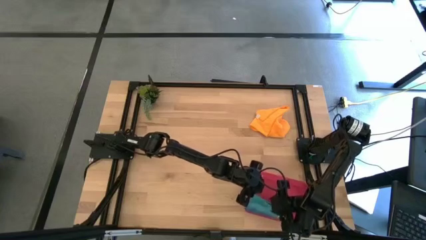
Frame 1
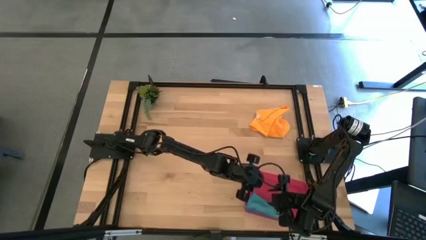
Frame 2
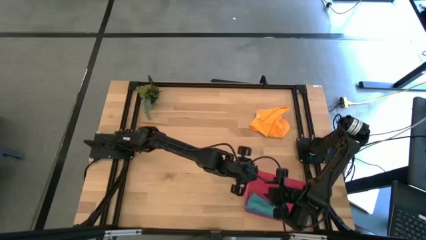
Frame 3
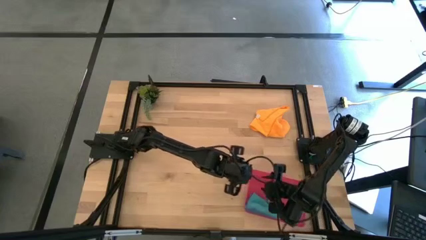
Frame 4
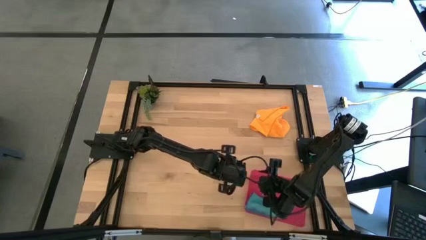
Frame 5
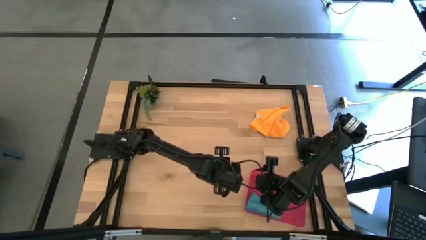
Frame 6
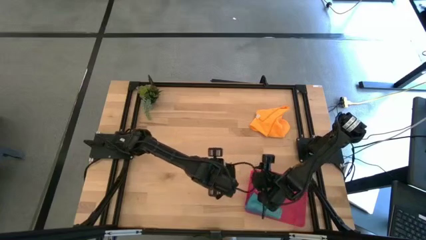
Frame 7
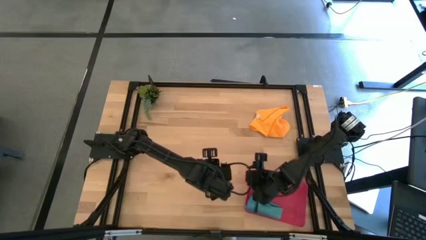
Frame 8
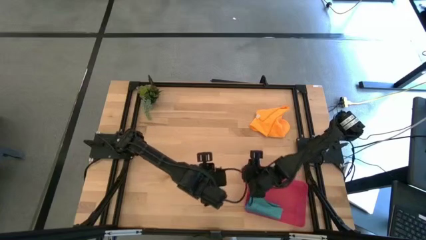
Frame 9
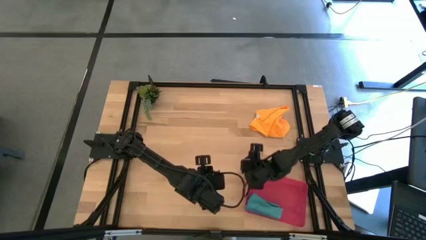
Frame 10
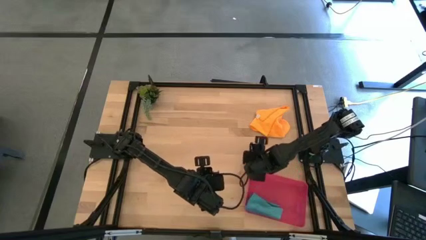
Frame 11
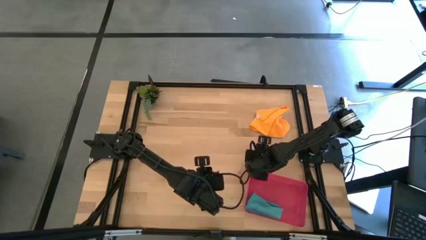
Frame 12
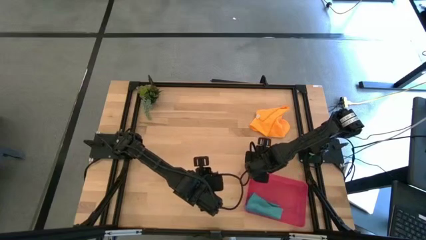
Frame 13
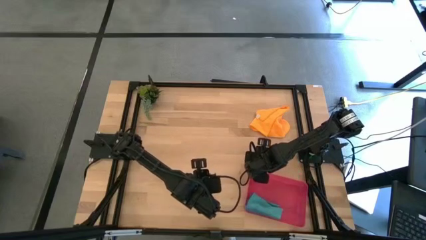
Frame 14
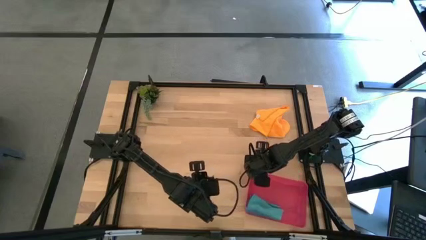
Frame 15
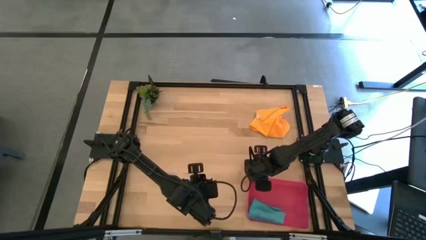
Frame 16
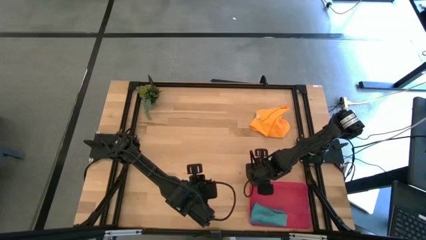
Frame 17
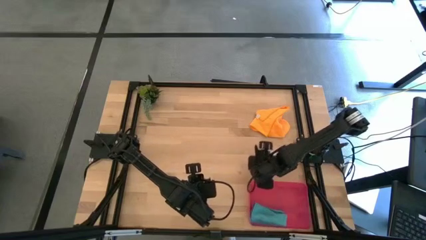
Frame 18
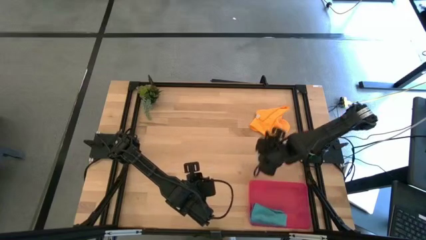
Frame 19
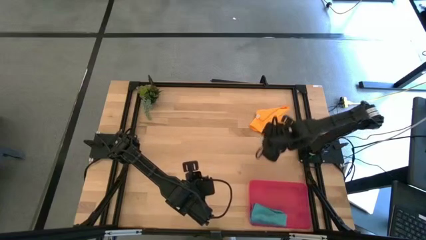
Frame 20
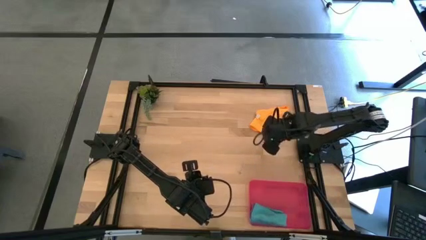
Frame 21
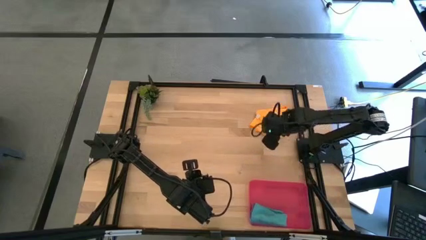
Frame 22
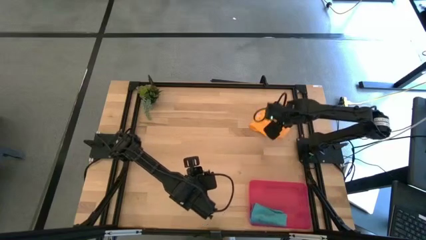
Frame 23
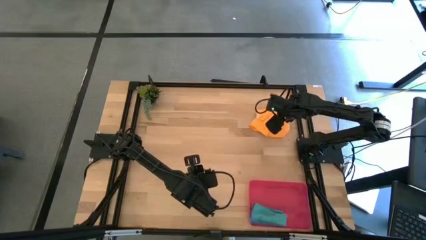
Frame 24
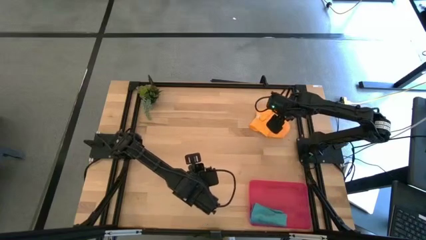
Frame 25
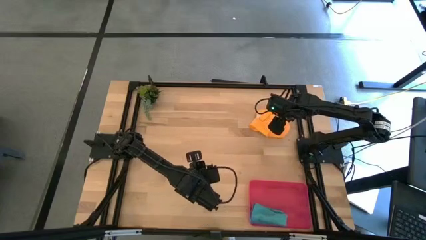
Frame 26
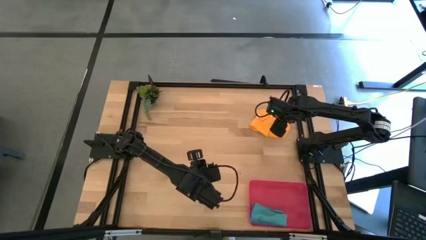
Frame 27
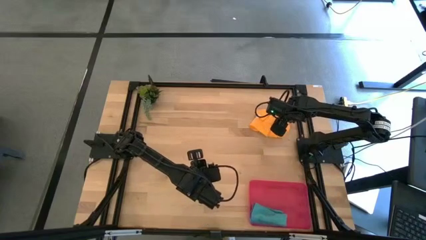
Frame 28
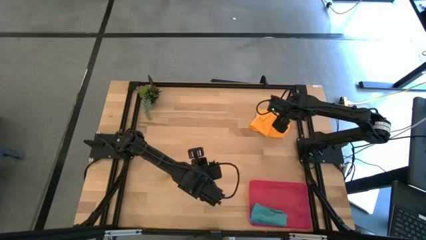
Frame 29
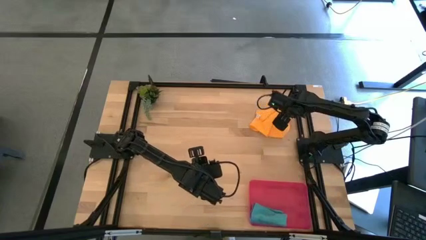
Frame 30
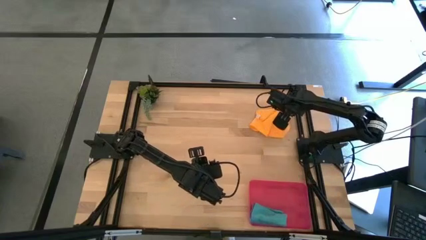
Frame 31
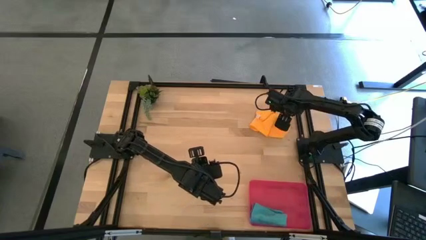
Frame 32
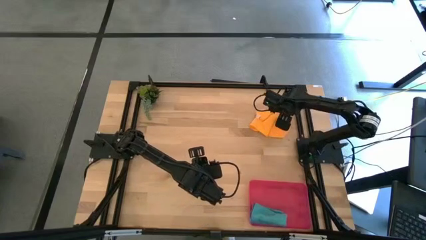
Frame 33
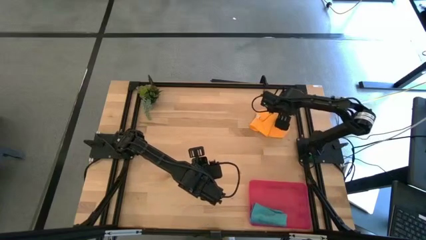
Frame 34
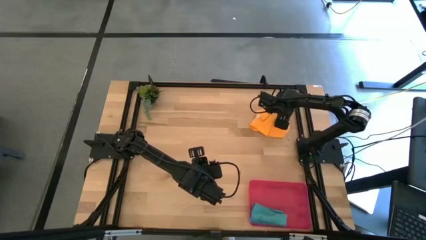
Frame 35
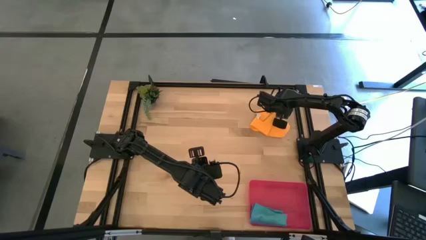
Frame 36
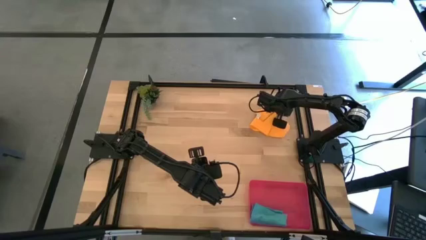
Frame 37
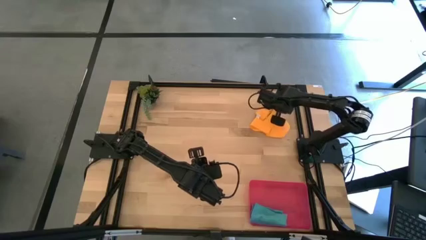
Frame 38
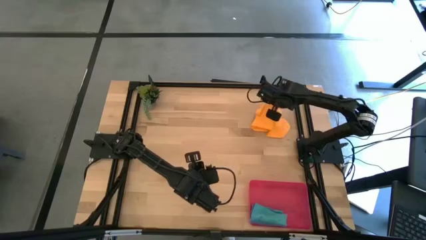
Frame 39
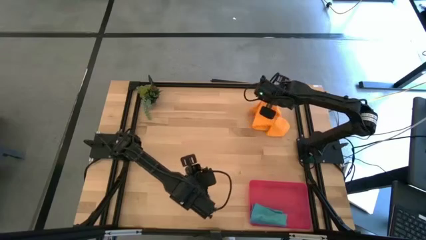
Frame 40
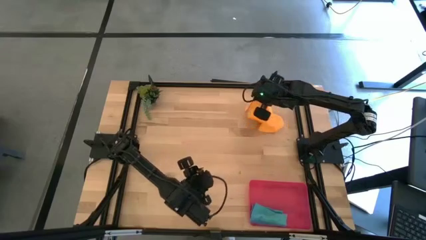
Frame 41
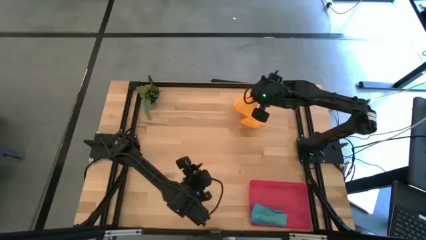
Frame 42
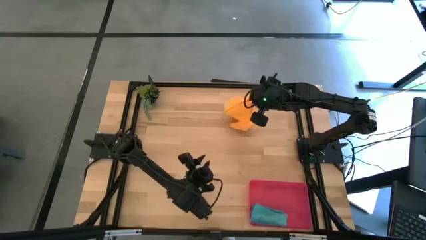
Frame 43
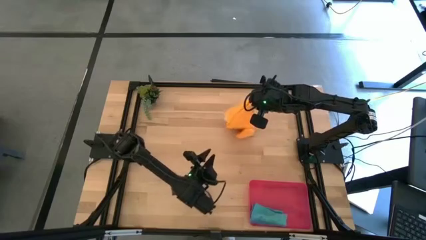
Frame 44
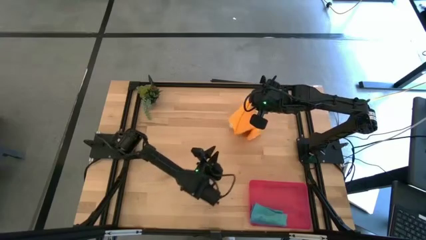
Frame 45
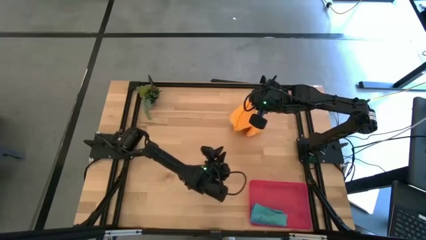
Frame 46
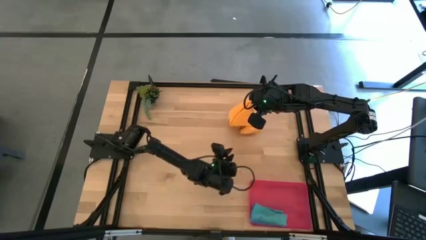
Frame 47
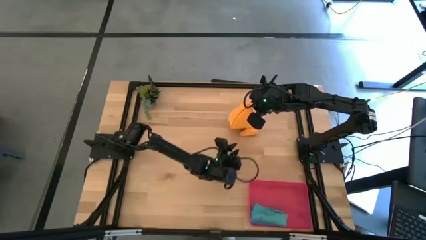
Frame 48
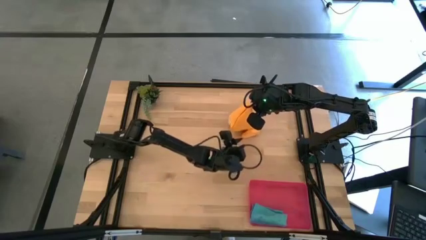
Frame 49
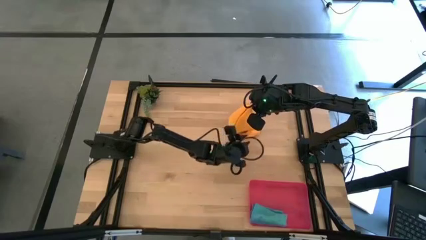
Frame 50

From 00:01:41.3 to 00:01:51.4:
Task: Roll microfiber towels into tight, uniform cylinder then place into a basket
Fold the orange microfiber cloth

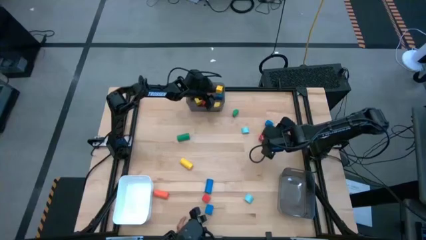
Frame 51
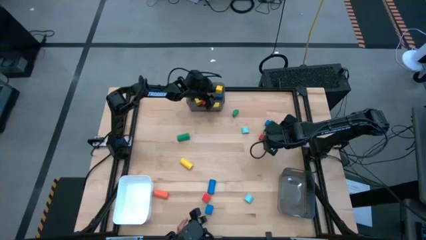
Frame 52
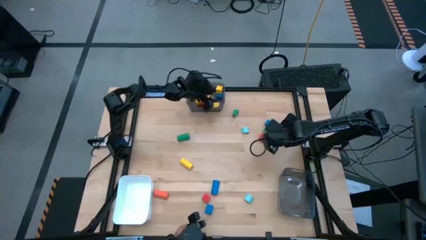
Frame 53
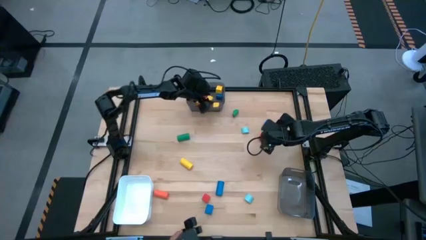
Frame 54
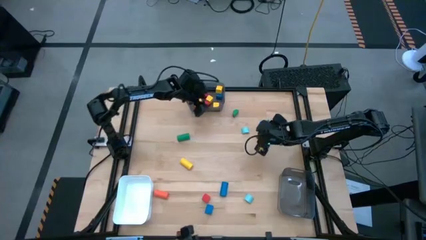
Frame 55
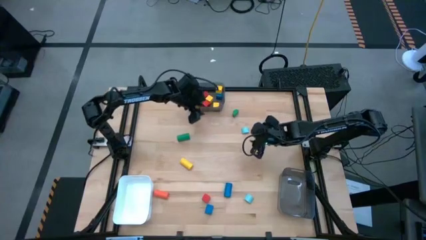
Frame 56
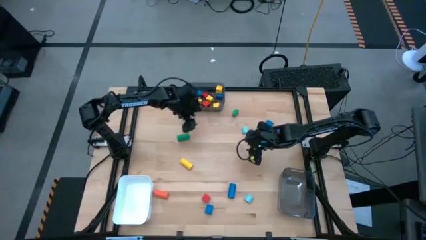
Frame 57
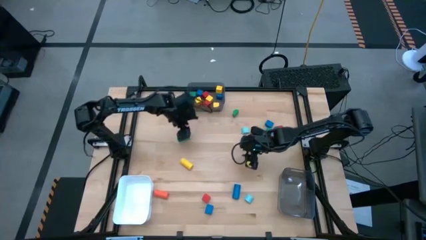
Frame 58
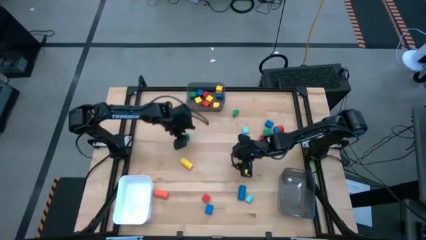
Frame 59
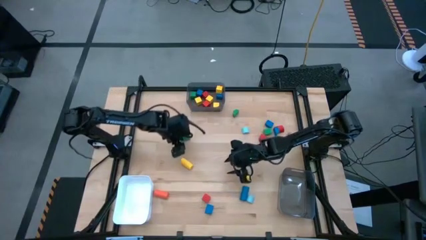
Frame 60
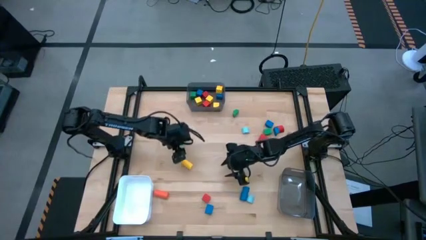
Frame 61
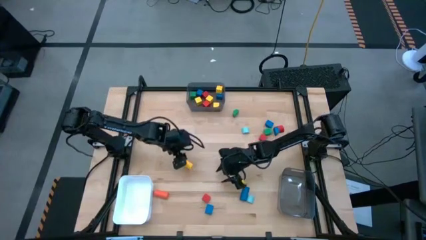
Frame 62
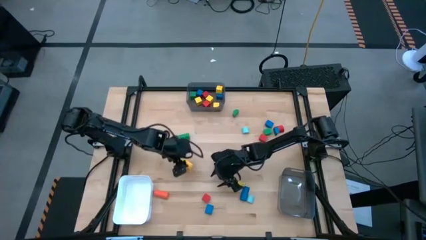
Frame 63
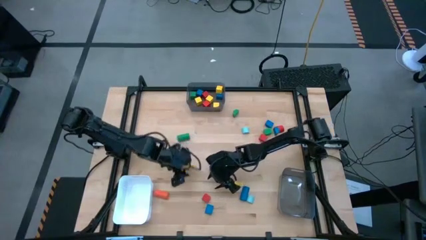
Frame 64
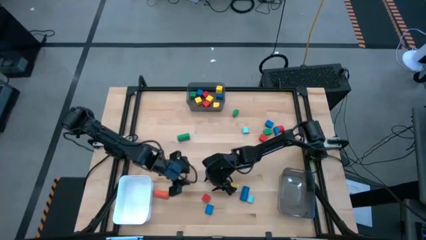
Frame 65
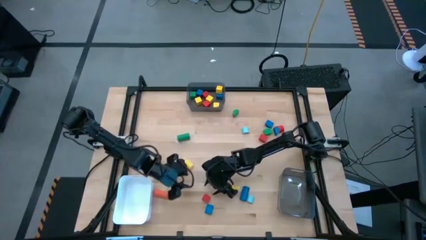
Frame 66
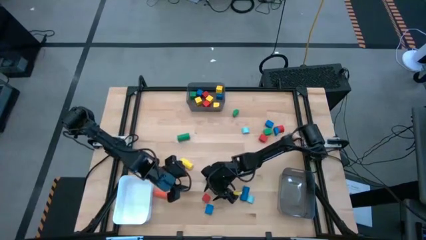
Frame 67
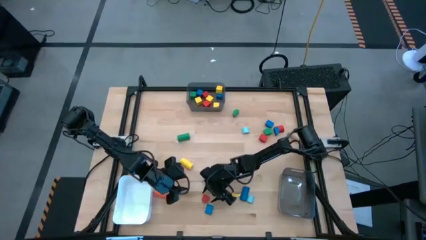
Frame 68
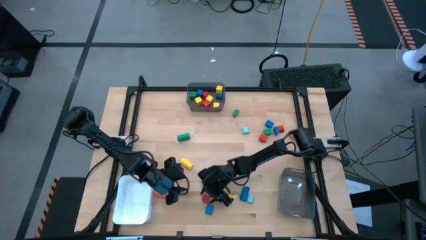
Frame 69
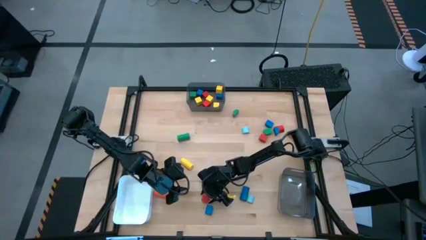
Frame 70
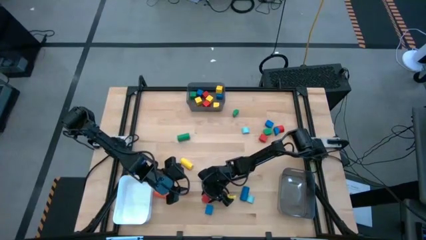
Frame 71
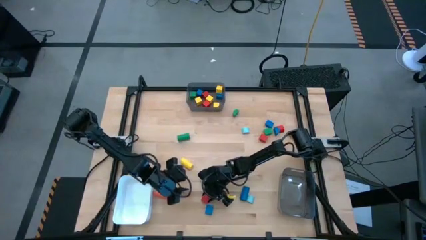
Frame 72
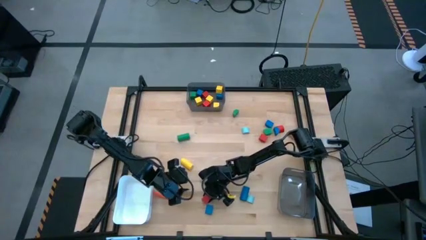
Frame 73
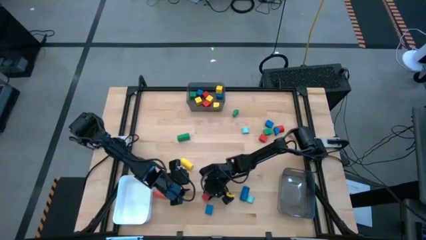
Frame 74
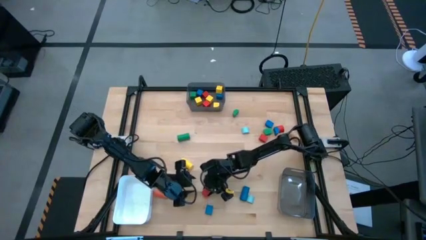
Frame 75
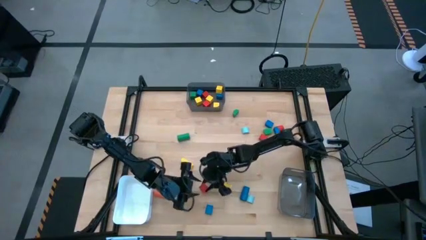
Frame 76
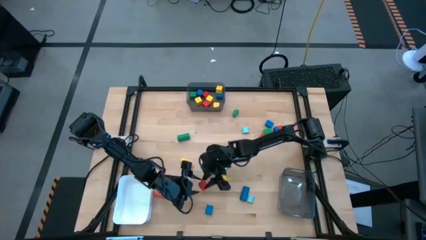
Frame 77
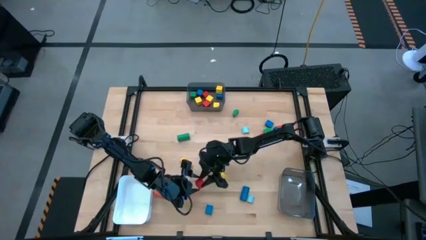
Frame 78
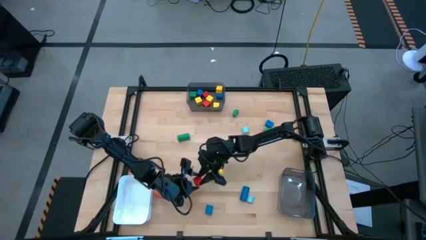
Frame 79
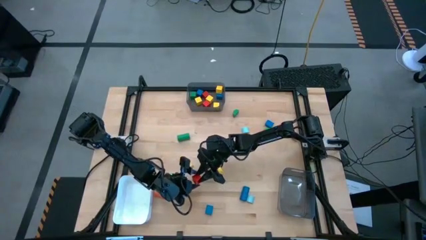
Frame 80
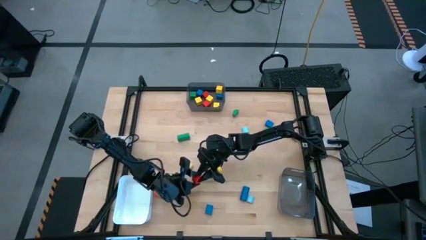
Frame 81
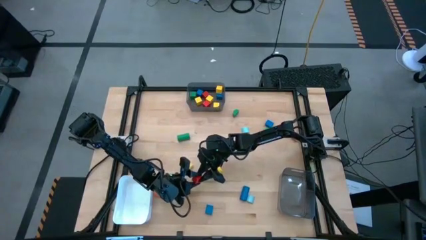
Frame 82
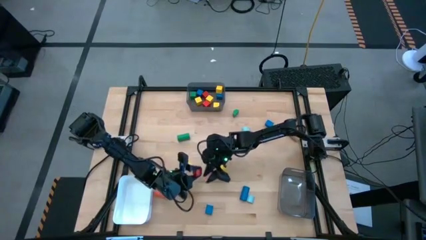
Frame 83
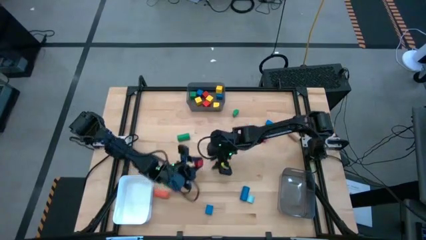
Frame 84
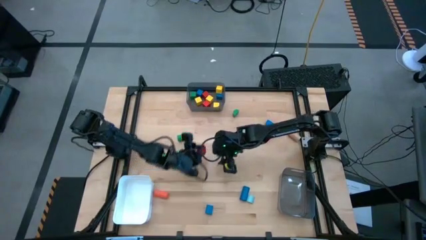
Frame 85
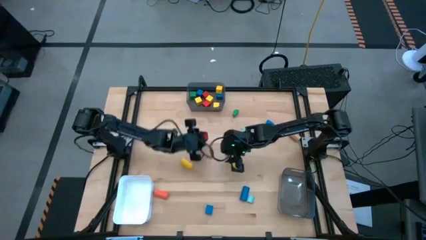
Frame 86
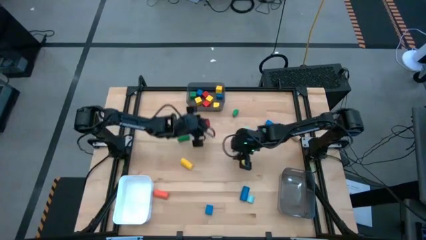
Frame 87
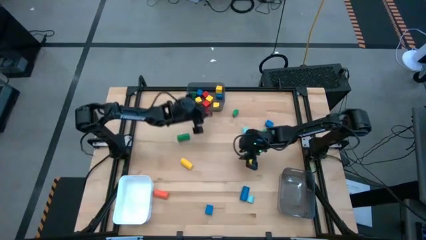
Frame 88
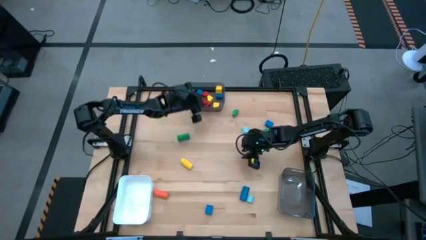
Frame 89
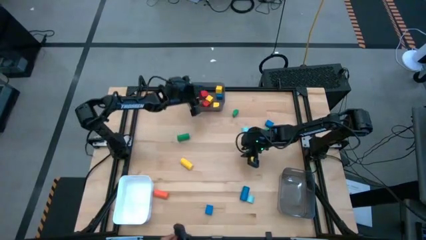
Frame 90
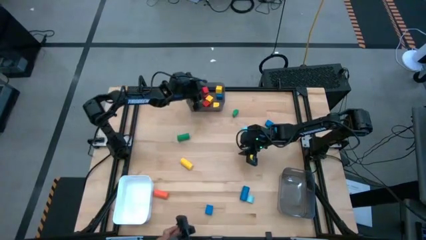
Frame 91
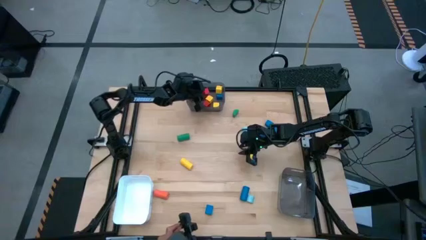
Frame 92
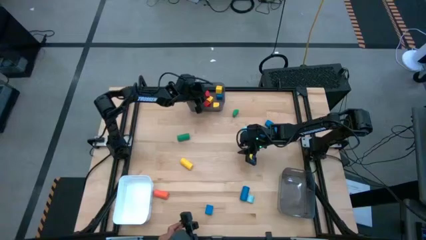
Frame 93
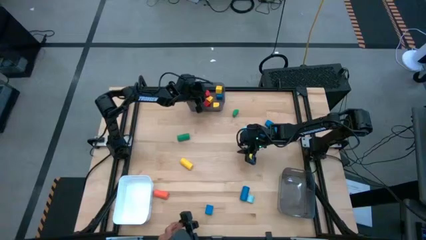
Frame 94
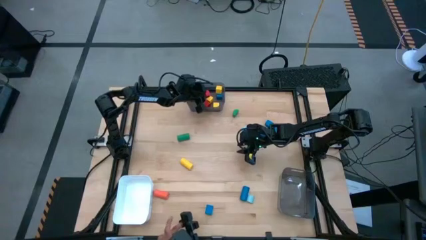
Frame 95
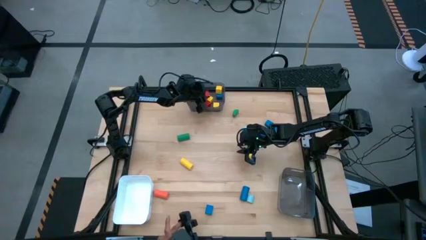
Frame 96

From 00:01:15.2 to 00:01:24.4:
Task: Sort blocks by size
Put the red square block into the top black bin
